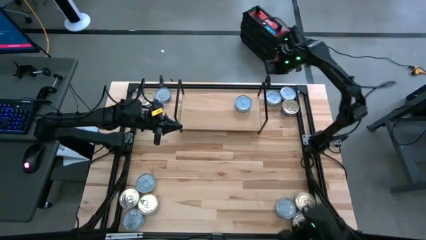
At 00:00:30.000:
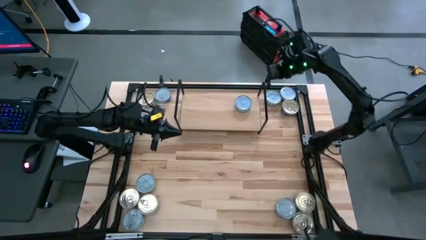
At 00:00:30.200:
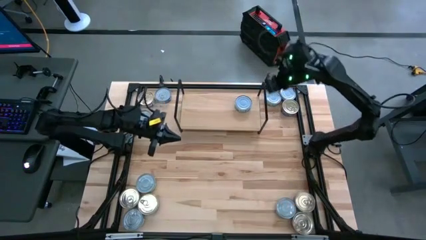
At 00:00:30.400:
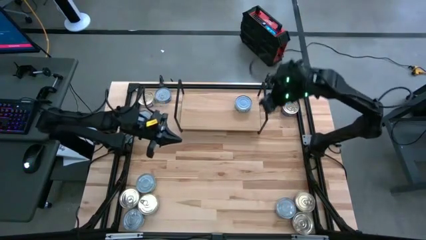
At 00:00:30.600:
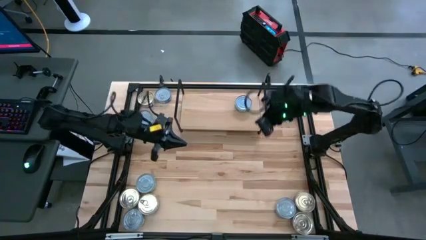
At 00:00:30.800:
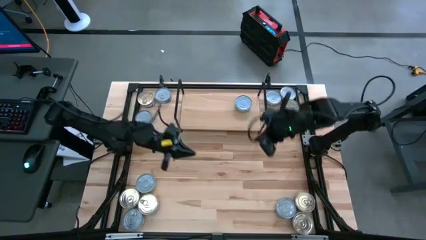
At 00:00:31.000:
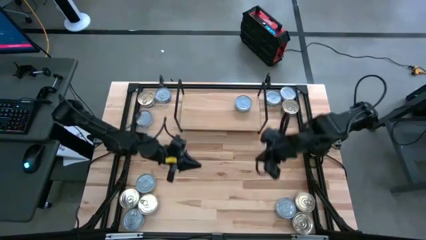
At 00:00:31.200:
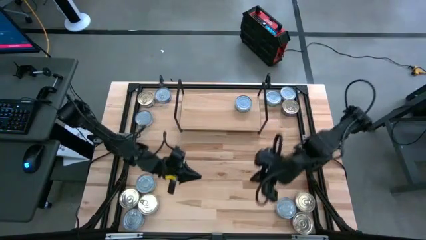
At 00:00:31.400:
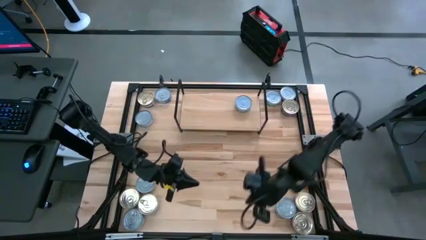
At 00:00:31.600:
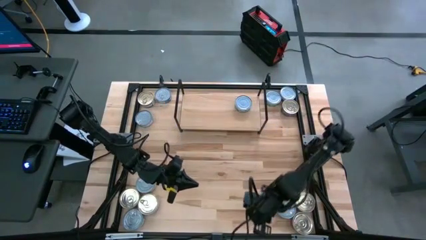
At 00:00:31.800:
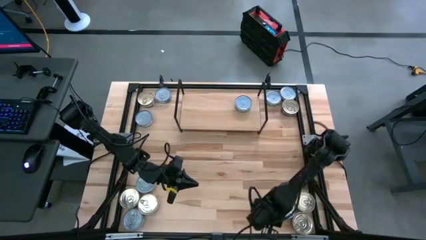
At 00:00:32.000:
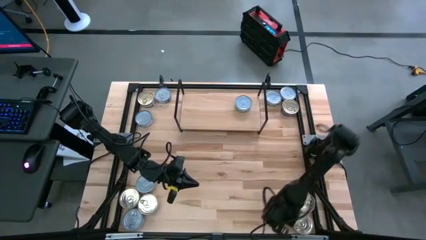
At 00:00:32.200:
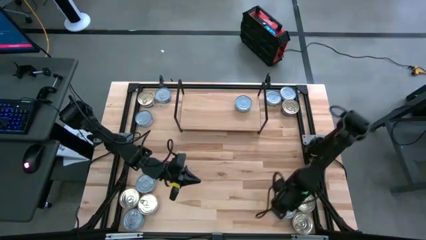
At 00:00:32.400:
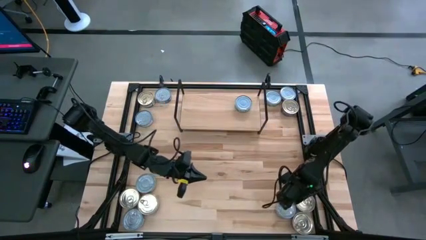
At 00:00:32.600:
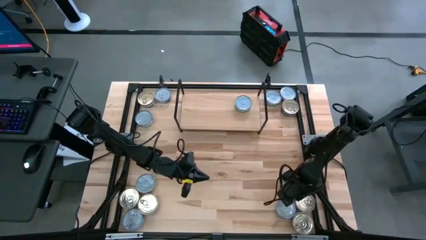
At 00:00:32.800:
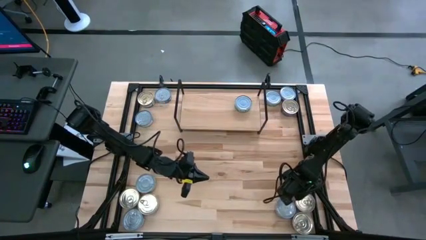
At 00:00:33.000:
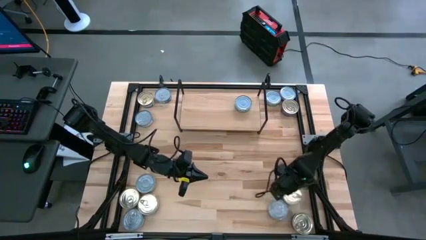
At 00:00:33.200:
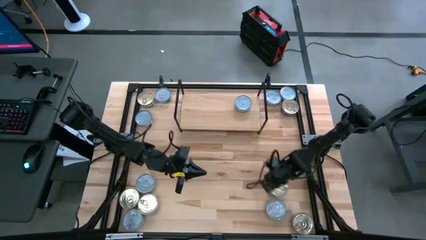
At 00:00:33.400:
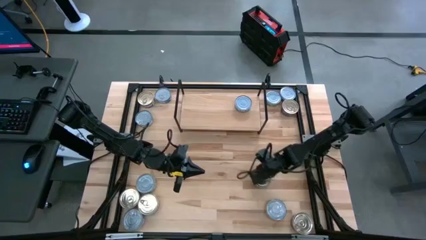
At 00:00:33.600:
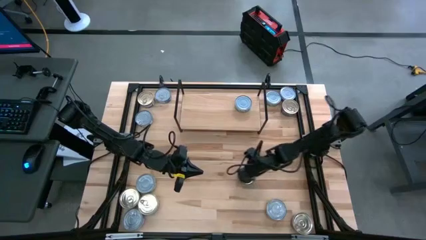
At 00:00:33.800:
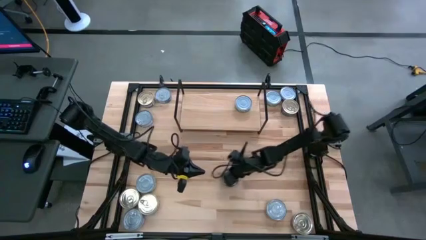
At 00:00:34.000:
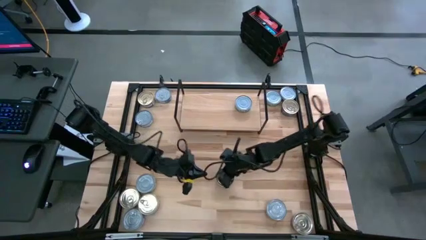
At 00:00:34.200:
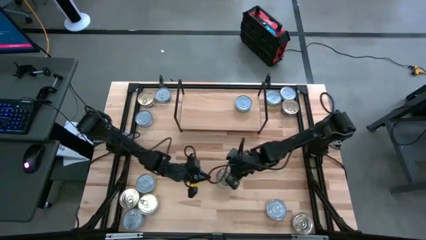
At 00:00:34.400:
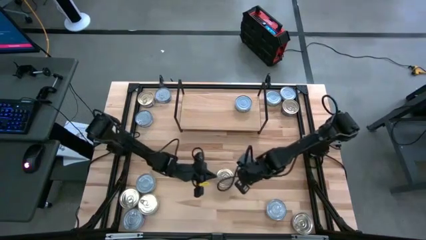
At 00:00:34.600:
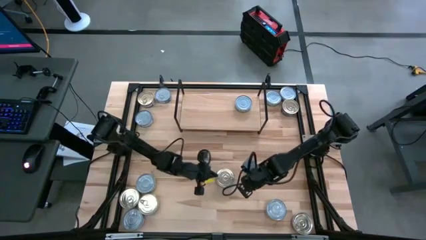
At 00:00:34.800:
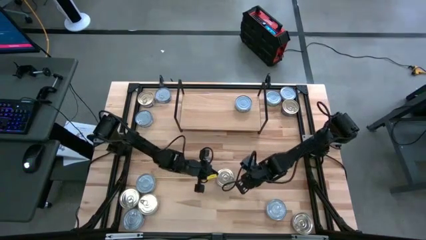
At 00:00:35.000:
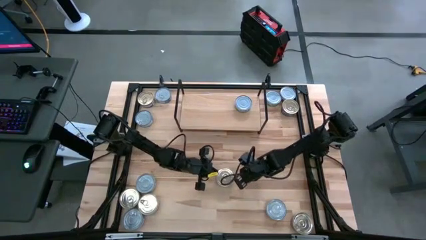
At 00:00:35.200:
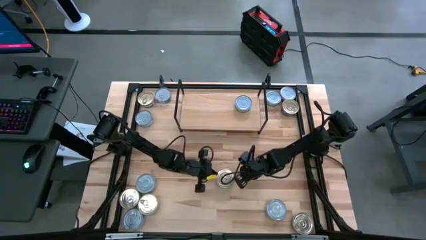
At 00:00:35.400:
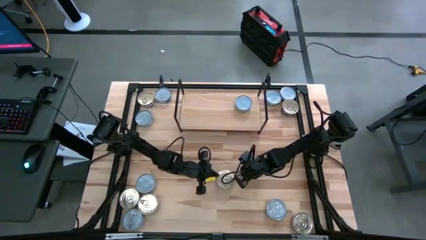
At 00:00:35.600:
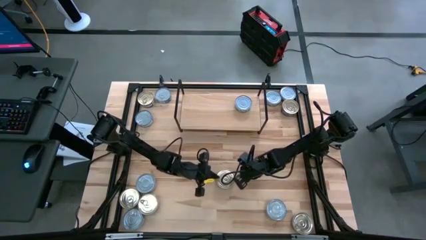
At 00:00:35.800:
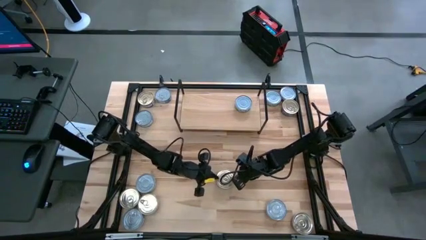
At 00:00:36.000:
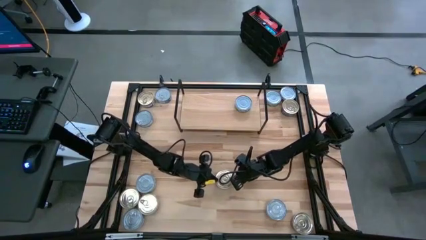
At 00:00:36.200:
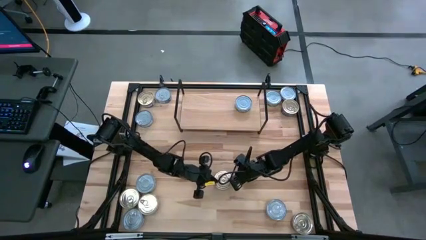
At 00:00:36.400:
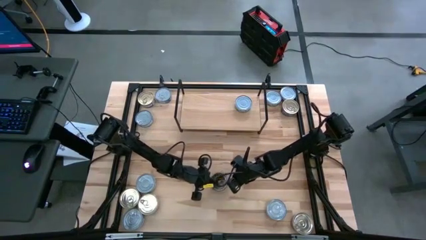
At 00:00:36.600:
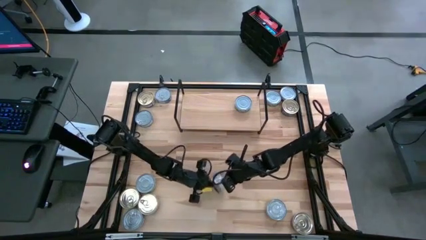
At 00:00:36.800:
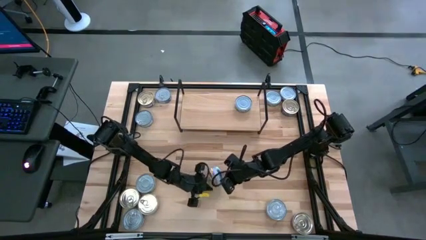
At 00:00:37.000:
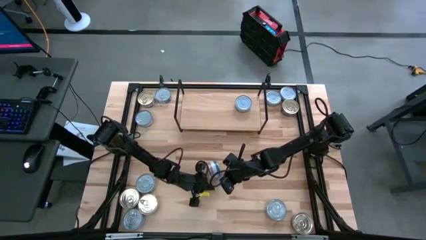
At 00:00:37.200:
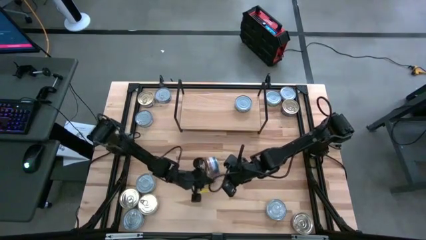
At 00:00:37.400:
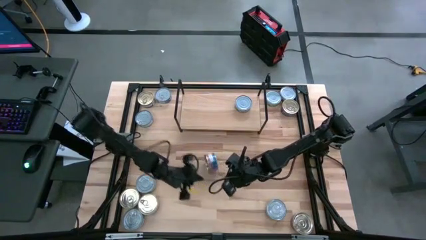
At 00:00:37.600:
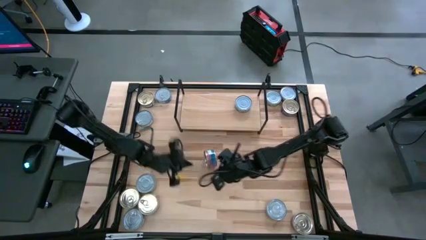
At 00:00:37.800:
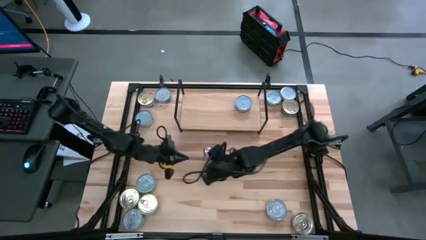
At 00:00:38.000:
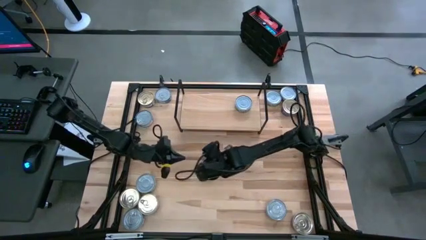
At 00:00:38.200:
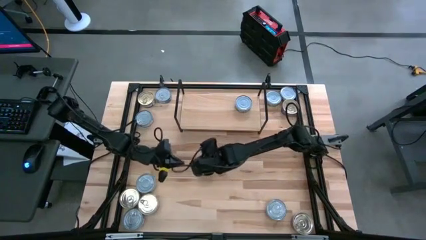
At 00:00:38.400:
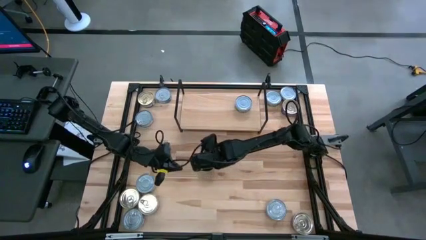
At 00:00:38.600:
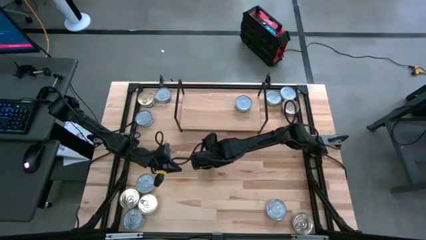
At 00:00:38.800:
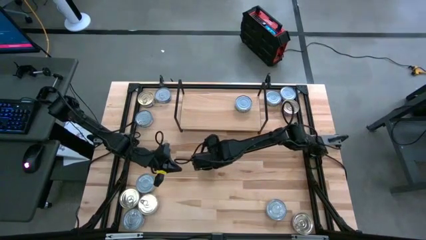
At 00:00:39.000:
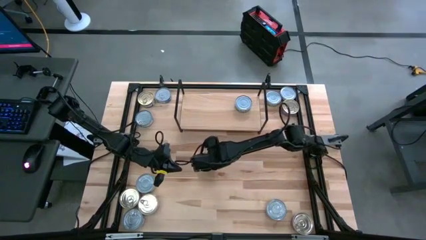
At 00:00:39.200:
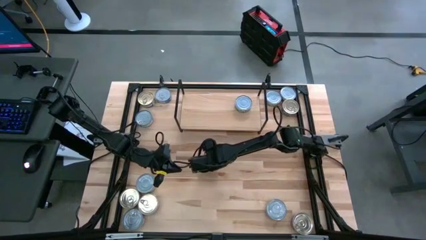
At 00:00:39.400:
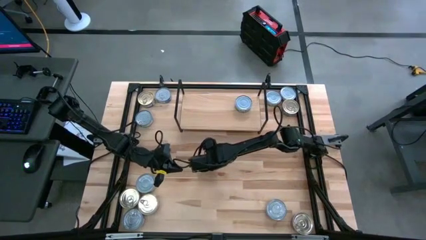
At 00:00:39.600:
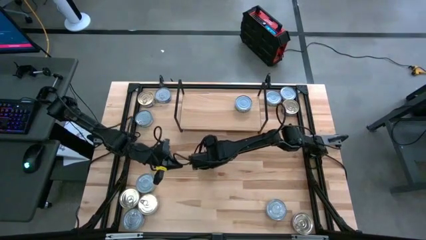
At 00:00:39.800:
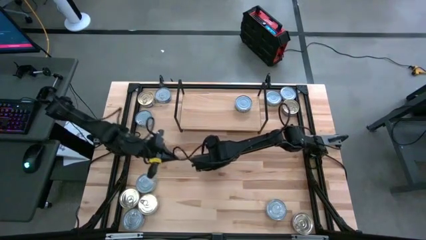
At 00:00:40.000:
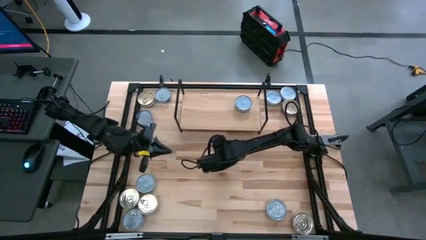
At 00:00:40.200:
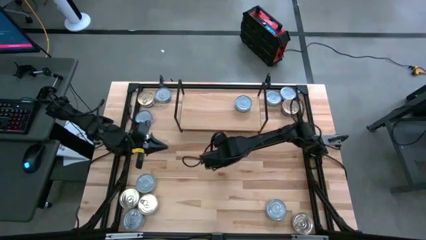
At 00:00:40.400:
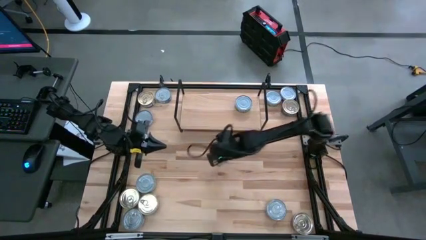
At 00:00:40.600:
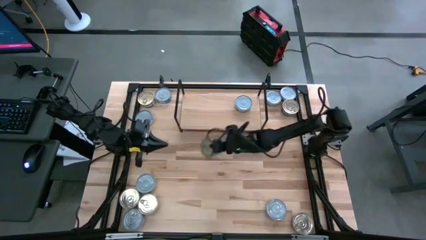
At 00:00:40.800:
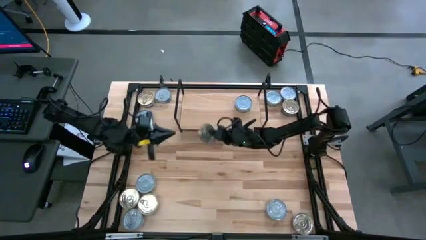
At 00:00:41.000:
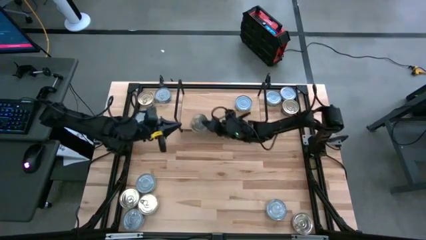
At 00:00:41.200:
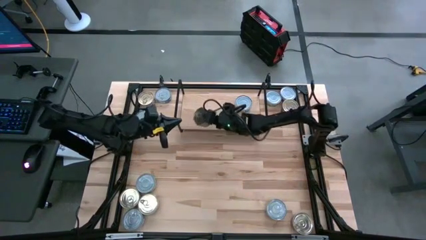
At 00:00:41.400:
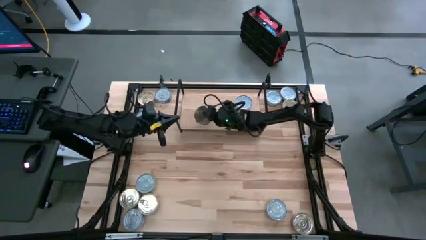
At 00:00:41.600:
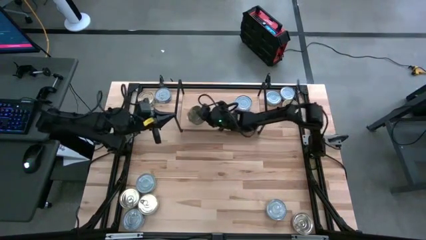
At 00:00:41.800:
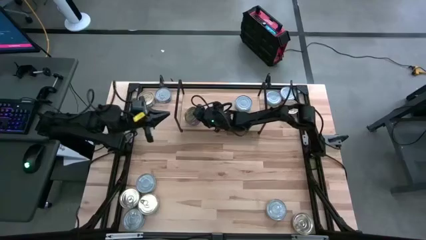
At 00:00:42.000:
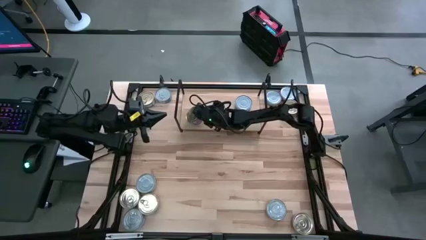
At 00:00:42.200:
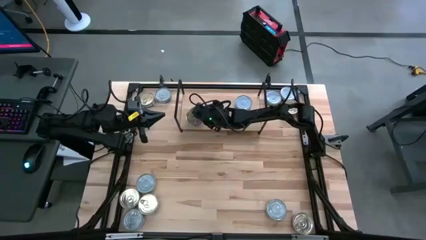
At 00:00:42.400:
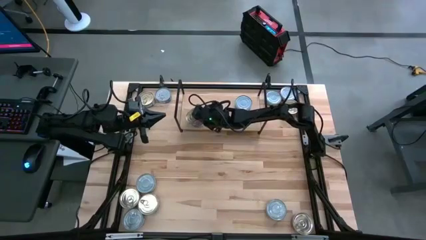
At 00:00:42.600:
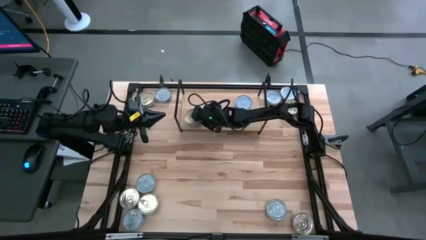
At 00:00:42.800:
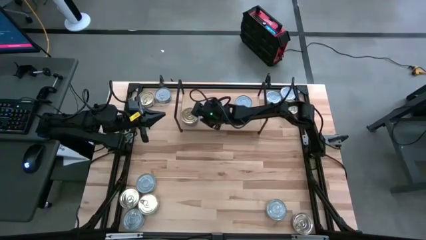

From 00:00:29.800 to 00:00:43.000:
Task: Stack canned seafood by type on shelf
Put the blue-pink tuna can on the shelf
